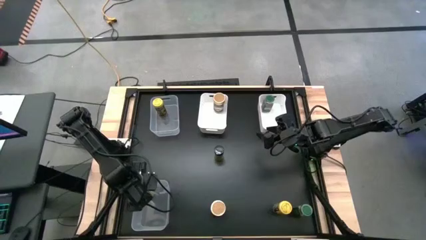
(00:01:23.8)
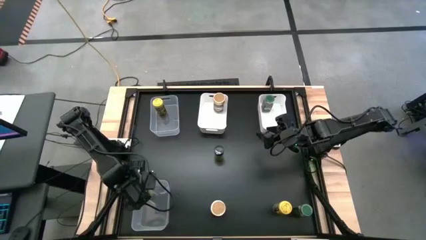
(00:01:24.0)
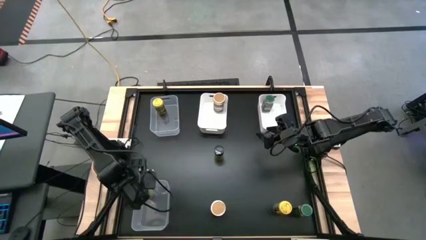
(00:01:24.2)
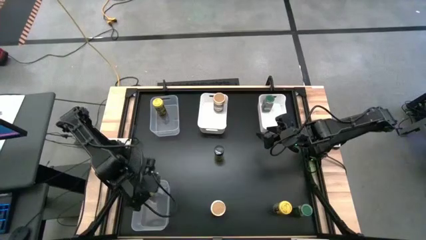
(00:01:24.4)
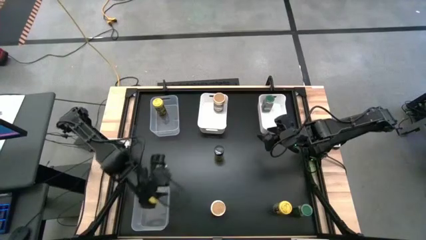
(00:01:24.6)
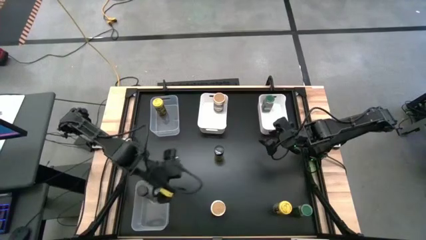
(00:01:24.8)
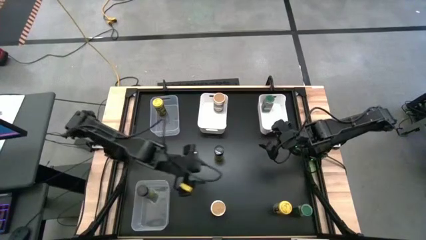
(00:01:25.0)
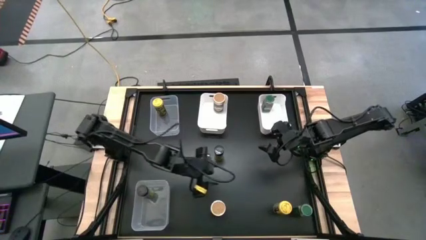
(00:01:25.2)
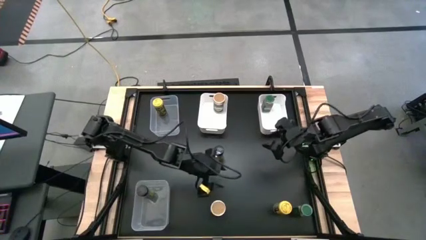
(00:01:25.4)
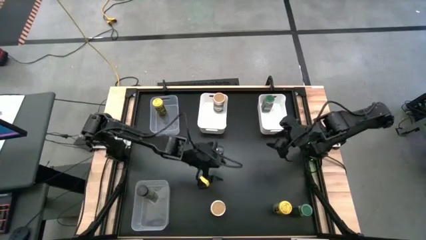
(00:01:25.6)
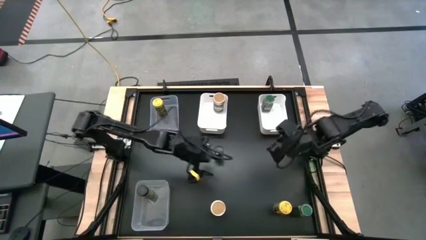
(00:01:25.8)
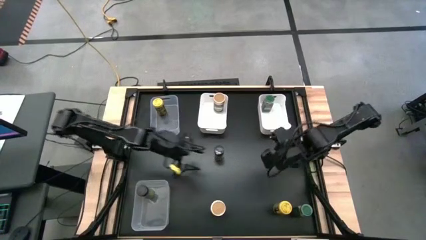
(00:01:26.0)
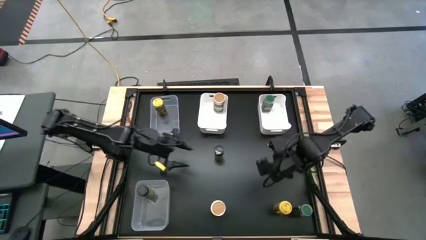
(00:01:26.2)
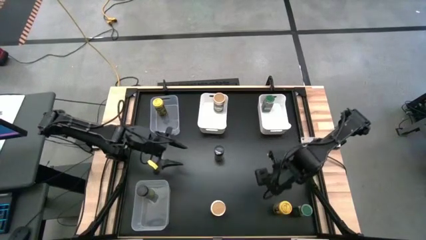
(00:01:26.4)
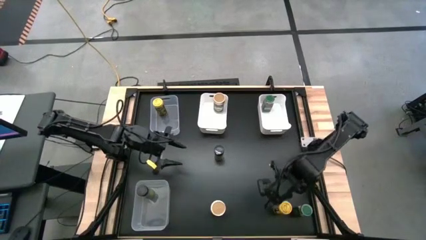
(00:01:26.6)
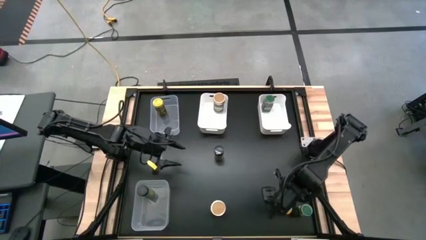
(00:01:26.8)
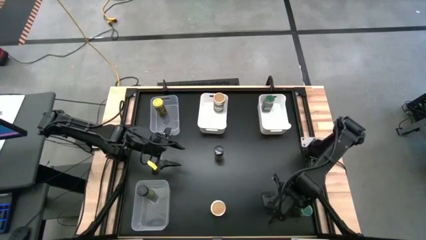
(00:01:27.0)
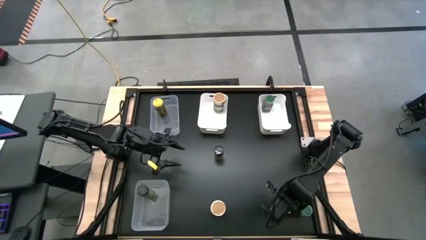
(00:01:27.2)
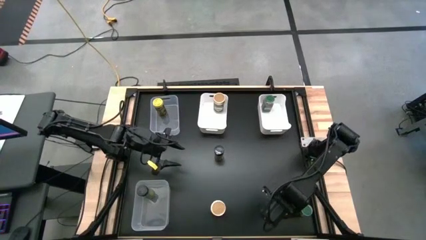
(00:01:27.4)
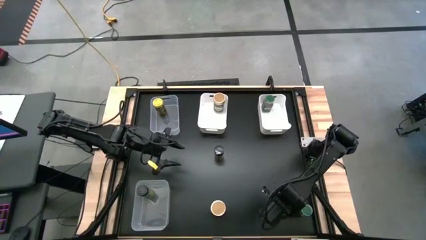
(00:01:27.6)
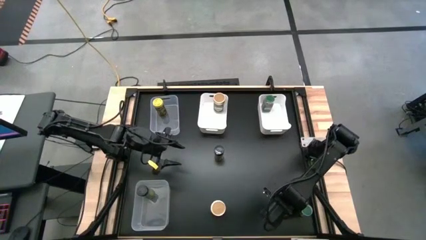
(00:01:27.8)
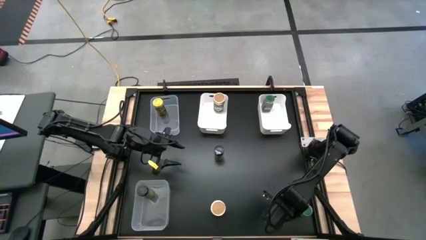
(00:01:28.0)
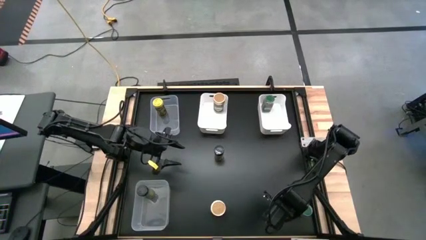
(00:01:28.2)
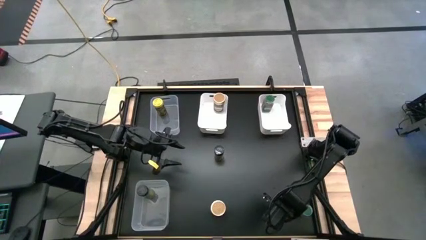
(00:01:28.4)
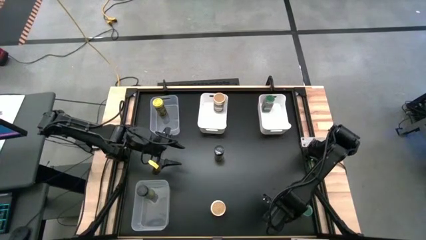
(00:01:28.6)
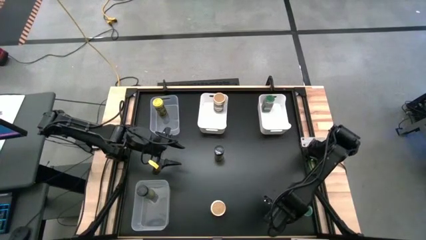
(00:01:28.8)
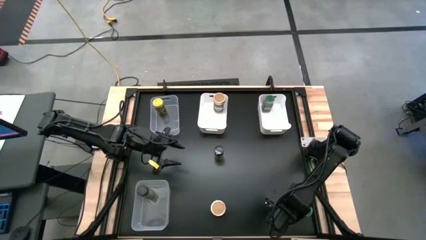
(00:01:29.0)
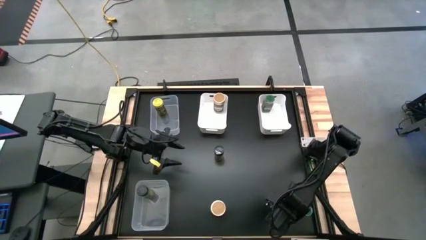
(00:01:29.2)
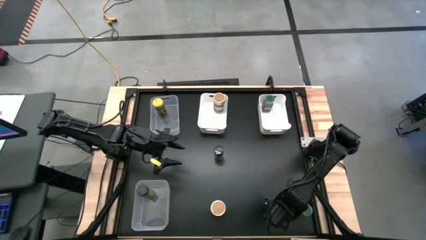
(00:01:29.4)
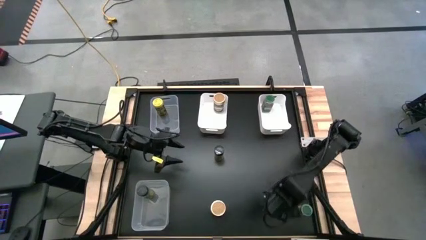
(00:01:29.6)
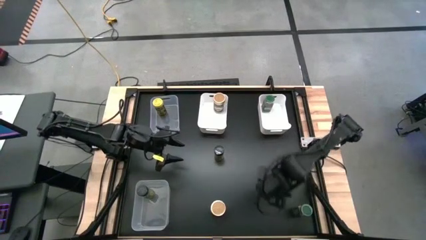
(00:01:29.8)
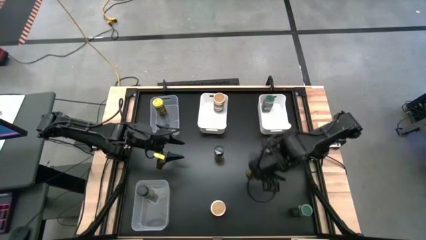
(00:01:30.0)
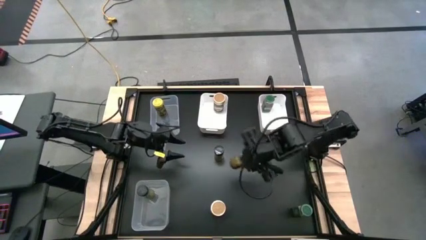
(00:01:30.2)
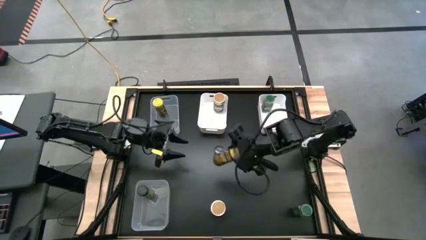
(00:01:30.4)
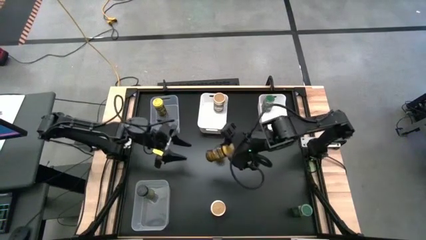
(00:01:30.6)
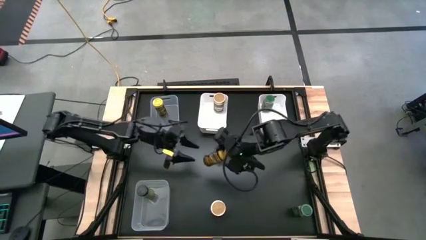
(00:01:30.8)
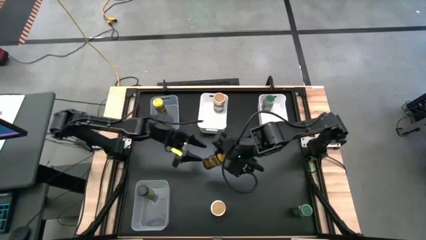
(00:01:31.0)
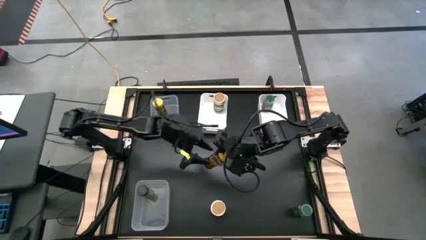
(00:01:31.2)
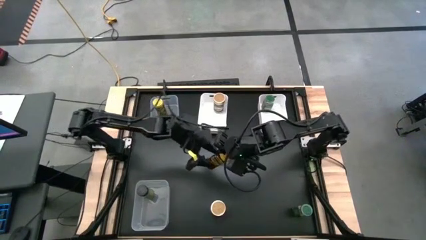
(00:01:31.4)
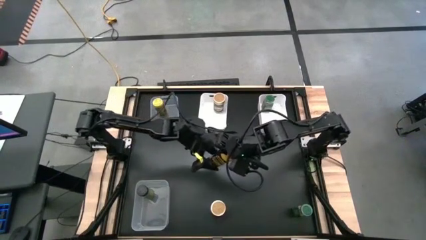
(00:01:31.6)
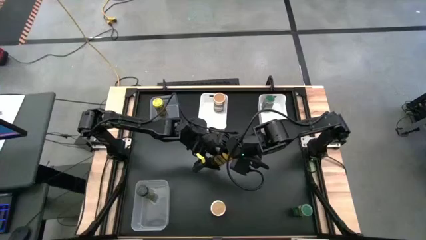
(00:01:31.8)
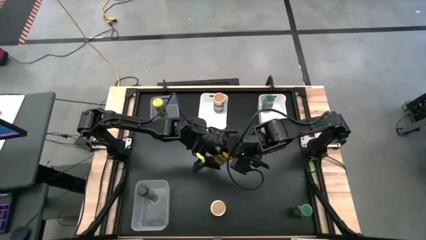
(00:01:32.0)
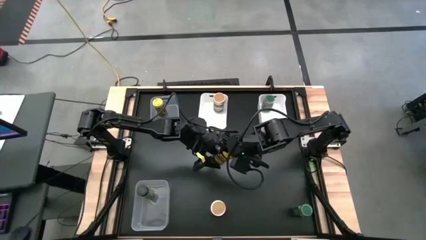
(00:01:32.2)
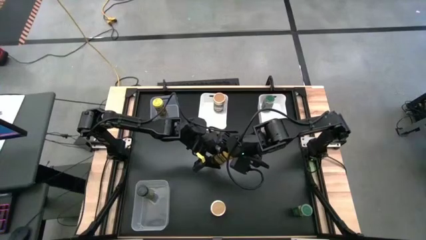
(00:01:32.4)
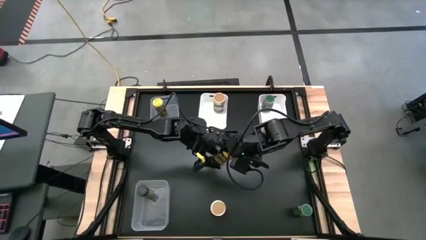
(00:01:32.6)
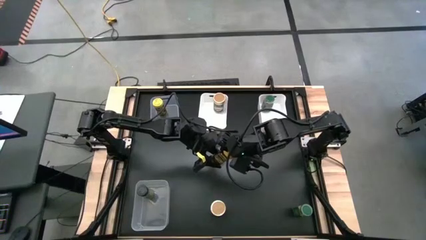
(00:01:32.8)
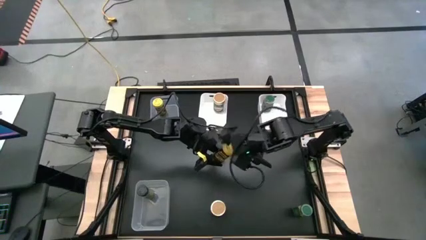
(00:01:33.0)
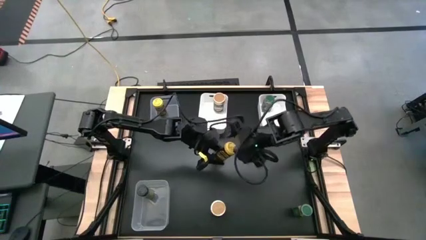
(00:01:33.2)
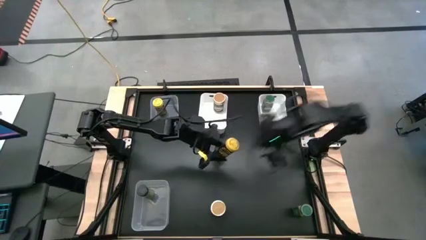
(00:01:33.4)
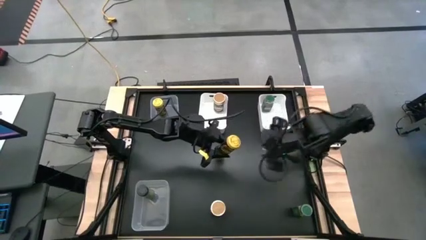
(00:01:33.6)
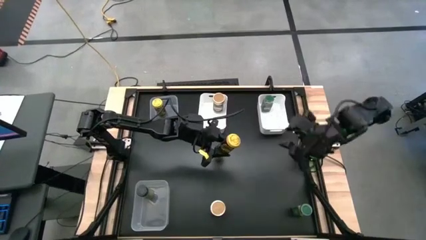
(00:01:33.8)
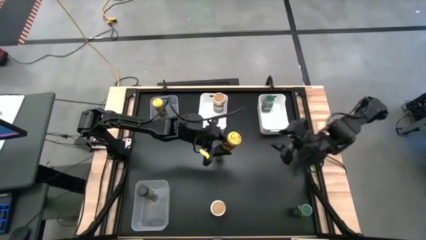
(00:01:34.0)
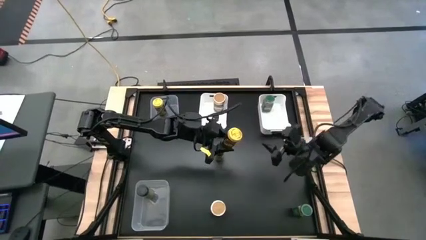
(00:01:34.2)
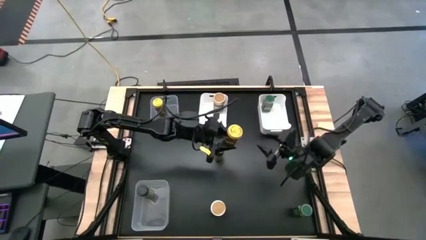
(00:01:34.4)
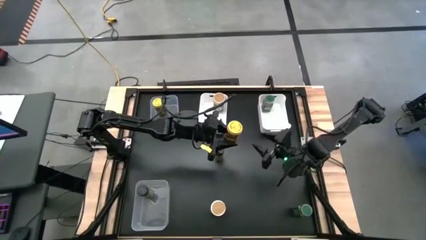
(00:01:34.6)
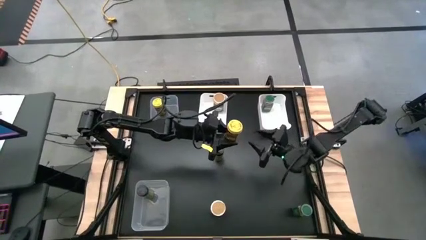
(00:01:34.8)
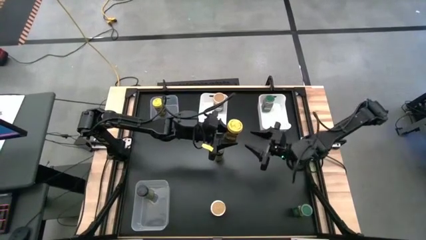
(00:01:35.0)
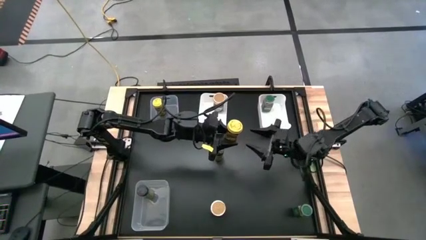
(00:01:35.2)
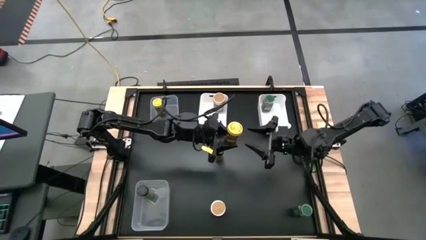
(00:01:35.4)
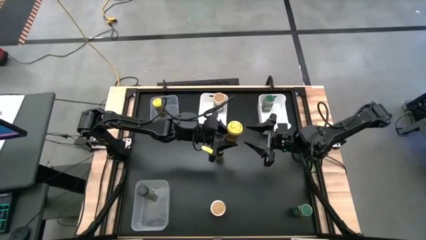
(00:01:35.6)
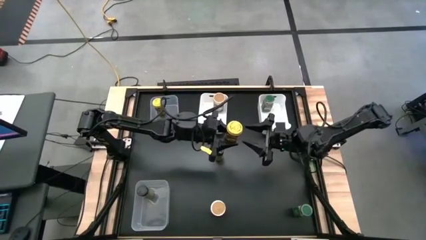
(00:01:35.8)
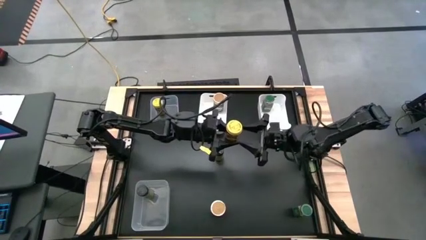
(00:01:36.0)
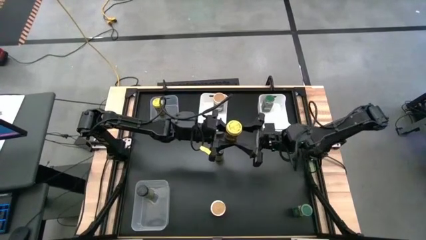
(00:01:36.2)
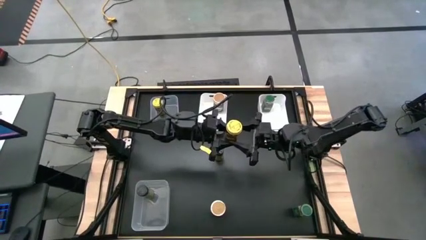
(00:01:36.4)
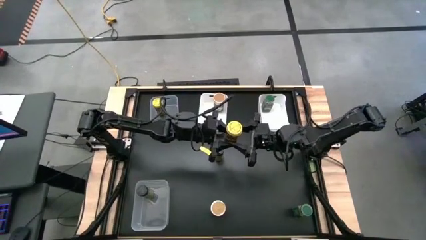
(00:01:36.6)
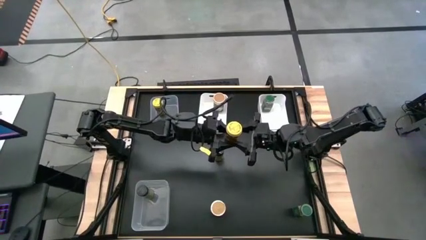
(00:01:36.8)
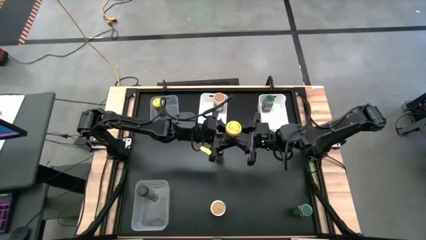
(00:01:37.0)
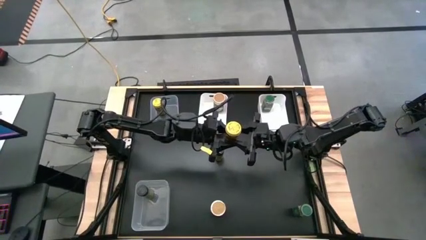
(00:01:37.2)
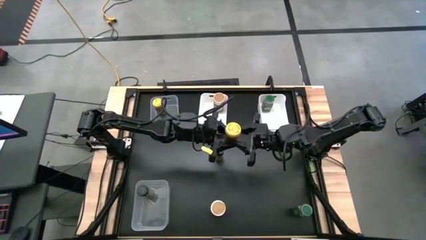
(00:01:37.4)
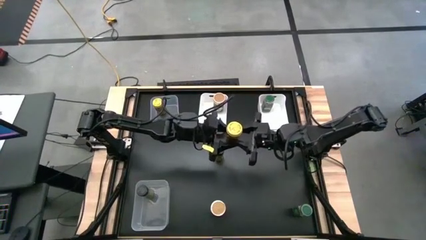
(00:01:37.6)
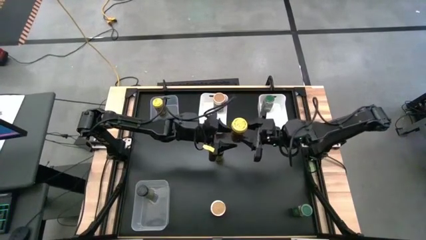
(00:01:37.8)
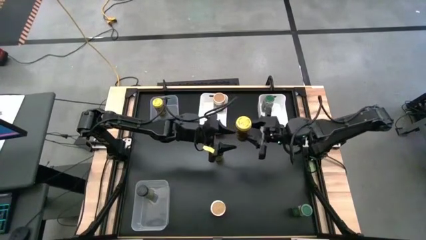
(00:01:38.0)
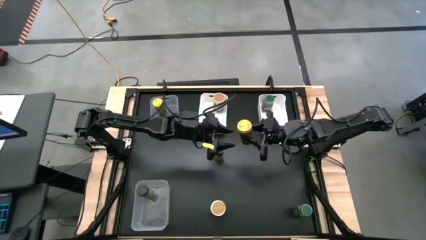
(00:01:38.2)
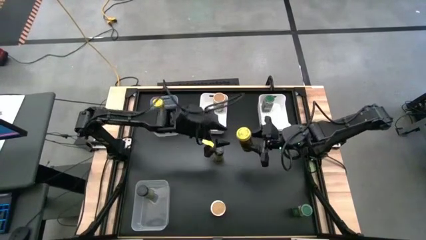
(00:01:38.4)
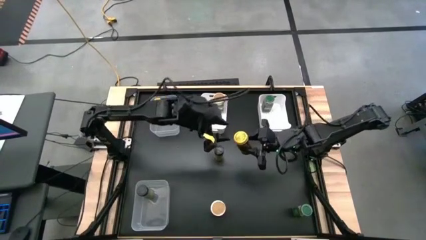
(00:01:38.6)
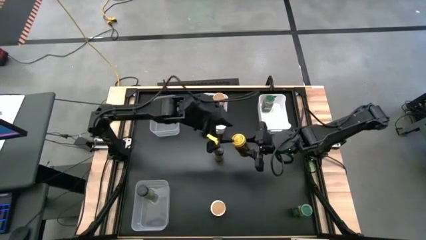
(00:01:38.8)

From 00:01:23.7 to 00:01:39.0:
Task: Sort spices by type
Put the yellow spice bottle into the top transparent bin
